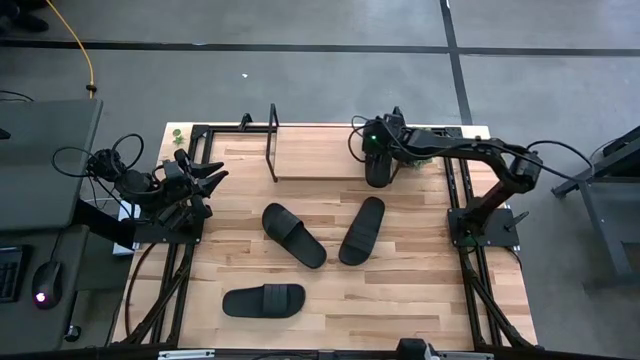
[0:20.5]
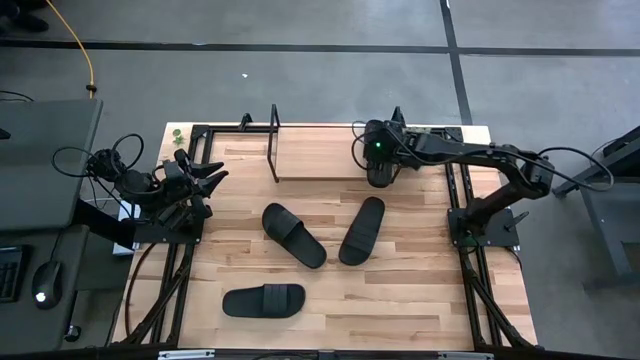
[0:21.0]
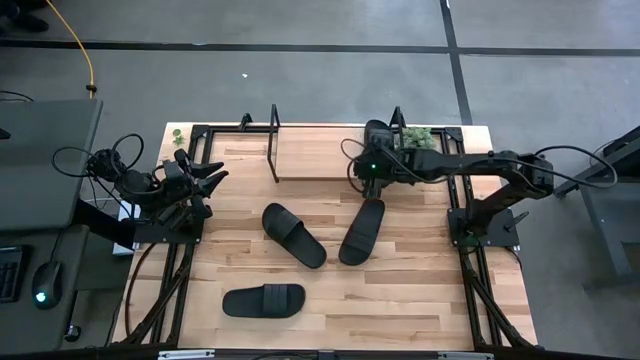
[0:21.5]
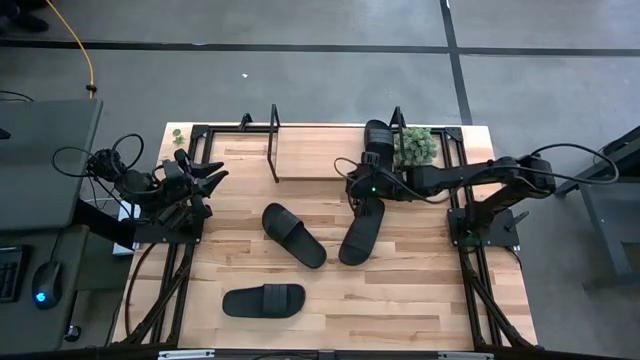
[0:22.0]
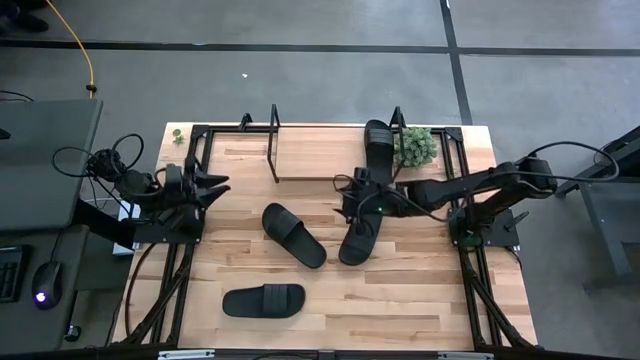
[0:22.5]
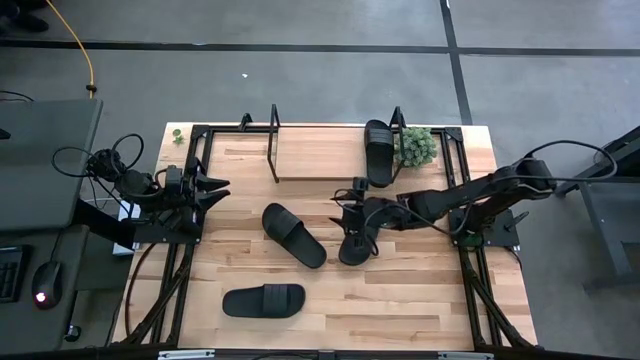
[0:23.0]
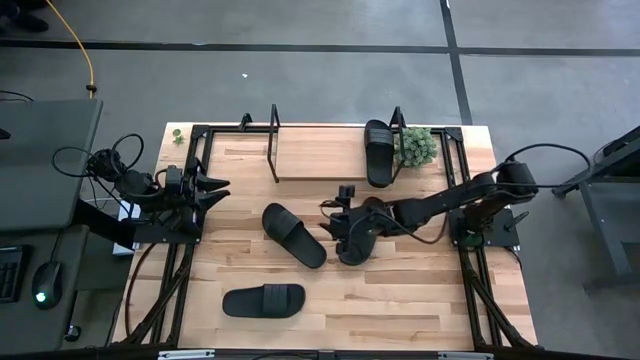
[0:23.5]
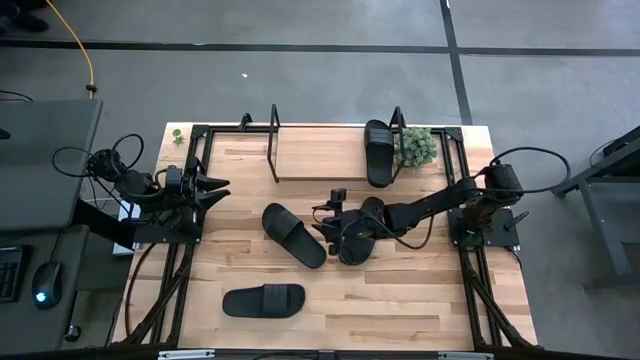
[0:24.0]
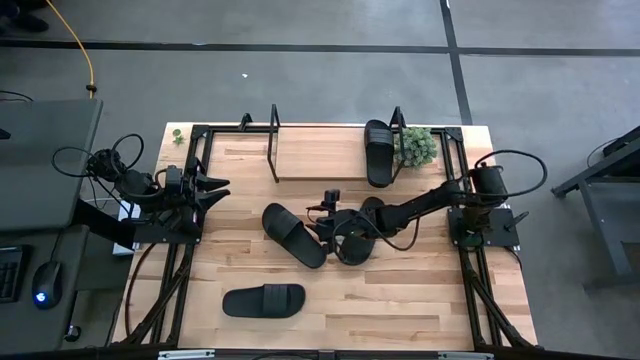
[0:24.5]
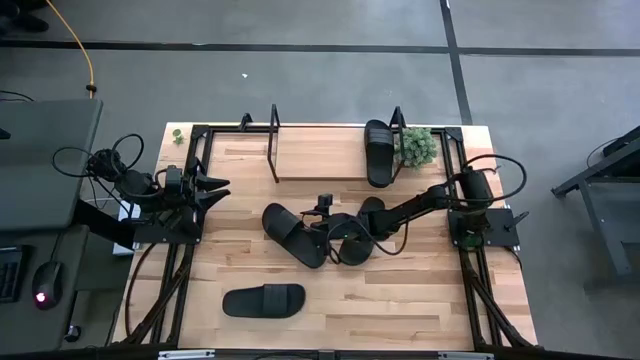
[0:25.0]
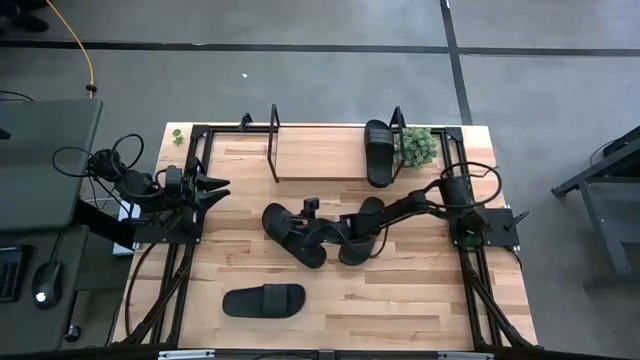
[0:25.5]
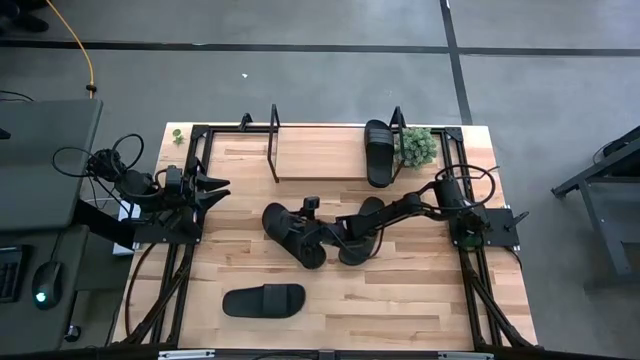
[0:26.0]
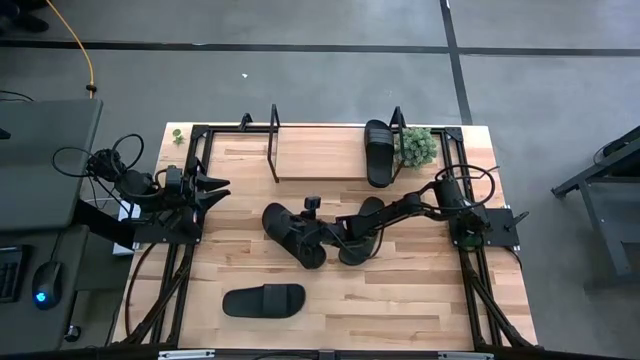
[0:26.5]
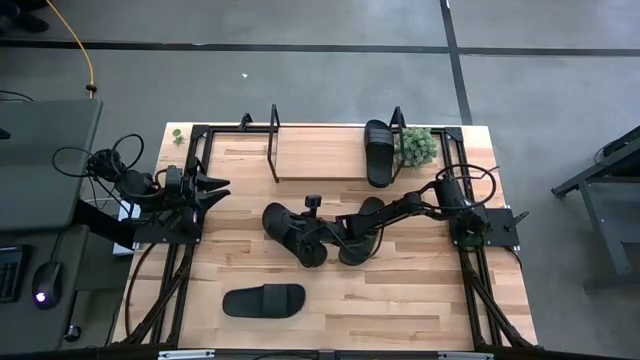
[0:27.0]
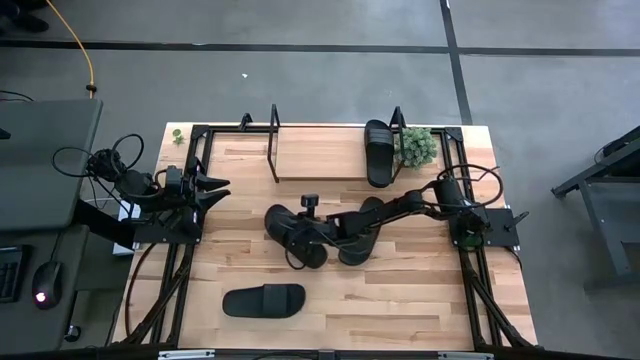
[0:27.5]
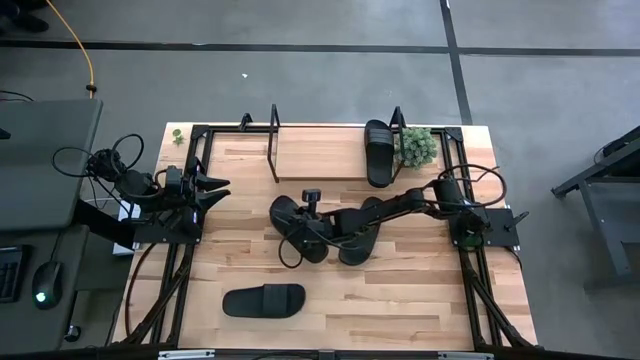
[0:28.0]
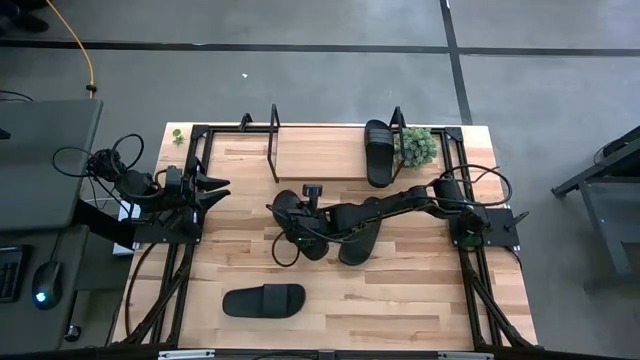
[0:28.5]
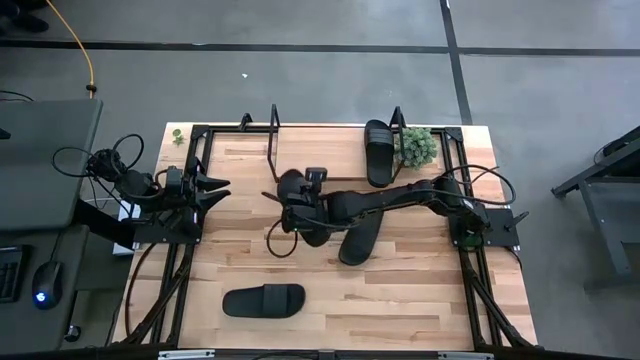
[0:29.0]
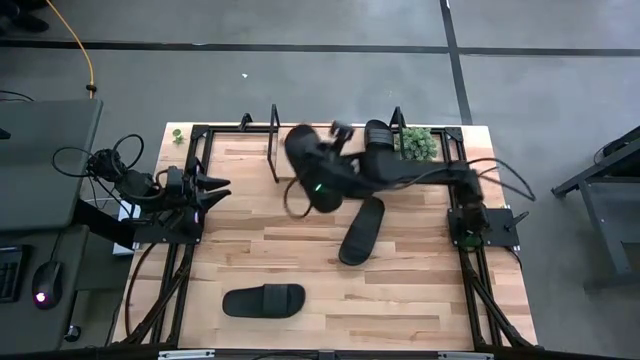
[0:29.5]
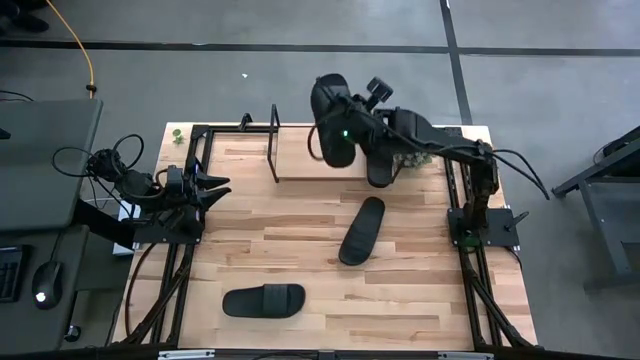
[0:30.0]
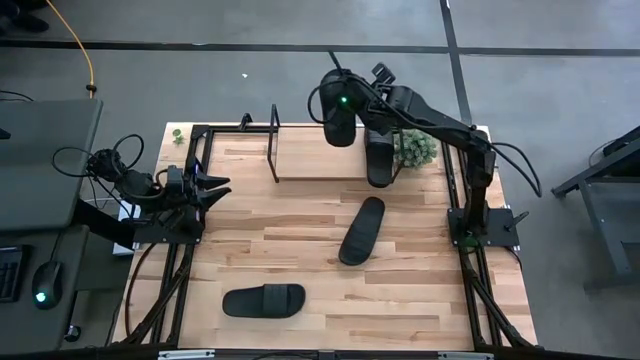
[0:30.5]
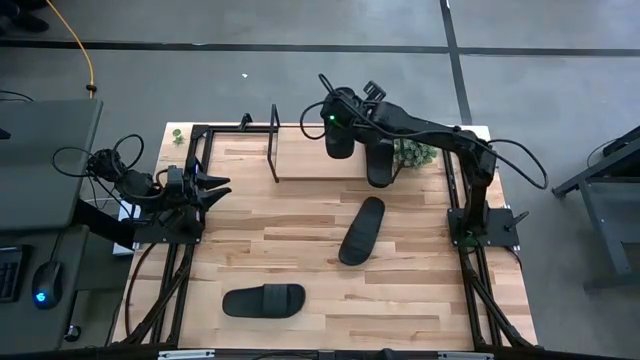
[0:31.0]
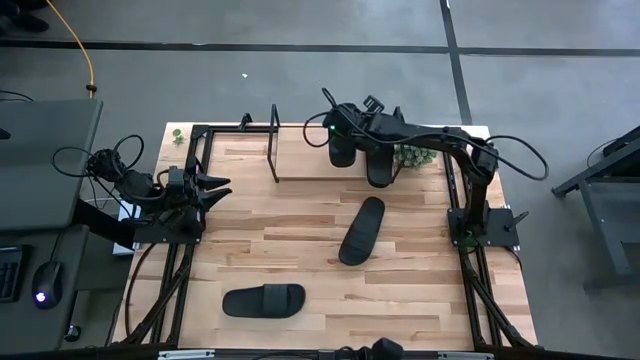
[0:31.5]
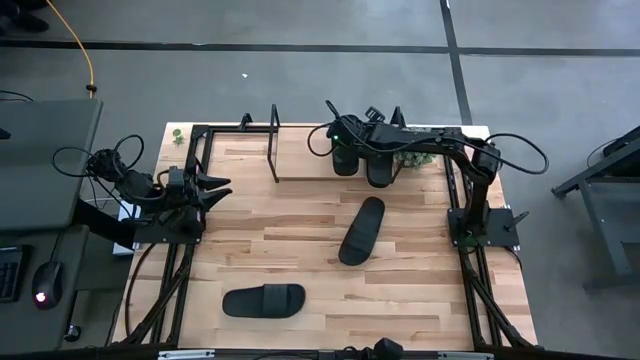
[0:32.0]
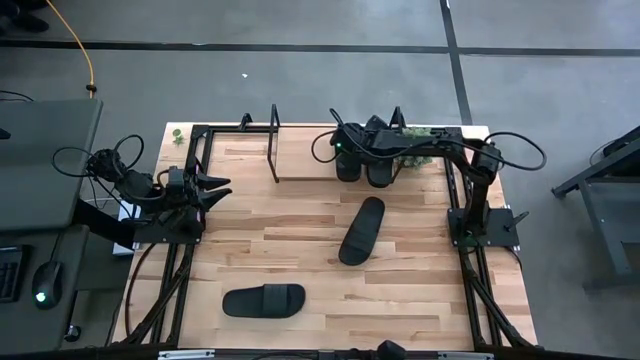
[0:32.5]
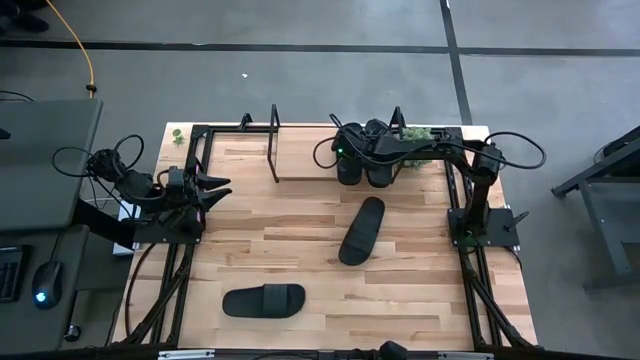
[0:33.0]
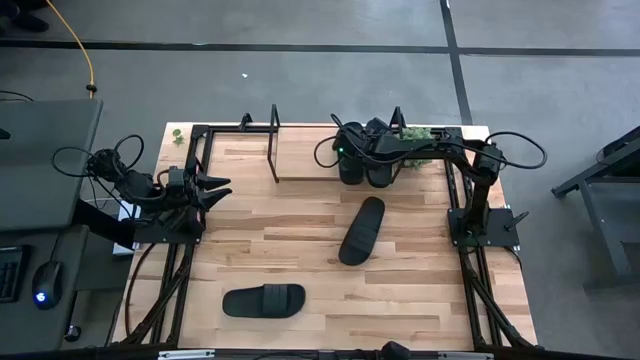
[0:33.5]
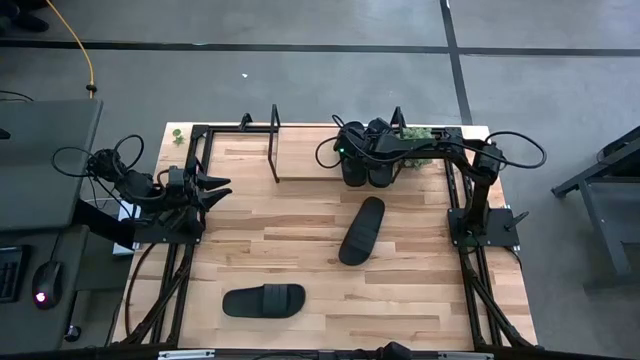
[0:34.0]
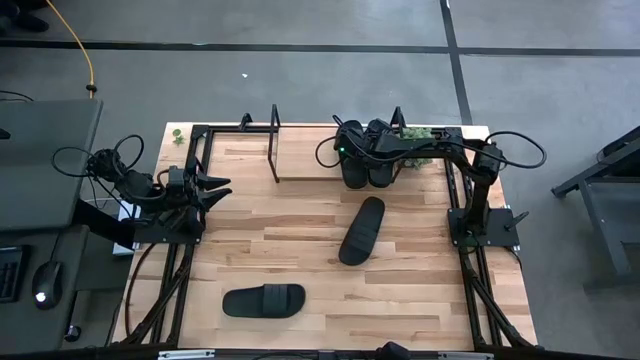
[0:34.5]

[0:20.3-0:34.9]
Task: Pick and place slides into the shelf
Put the black slipper on the shelf
